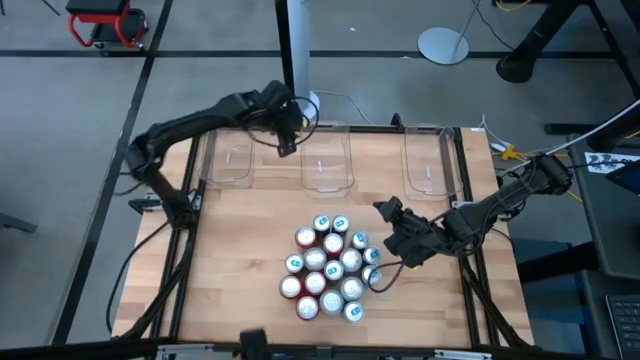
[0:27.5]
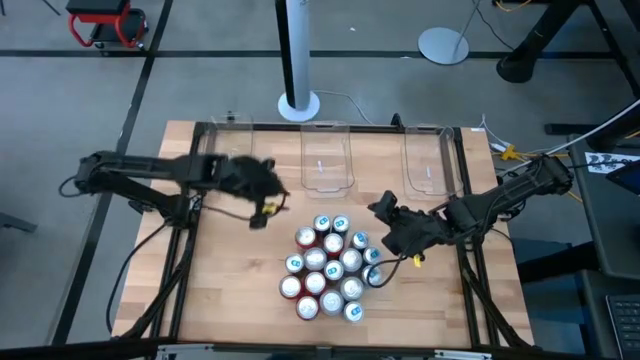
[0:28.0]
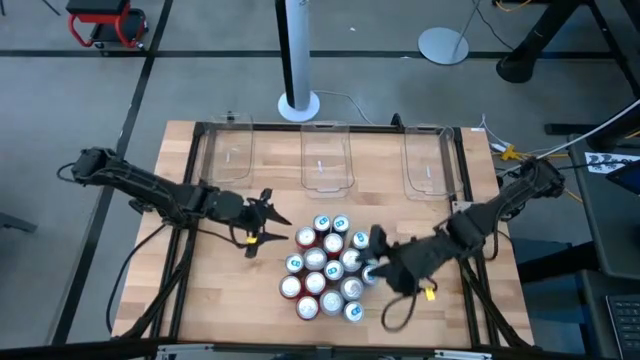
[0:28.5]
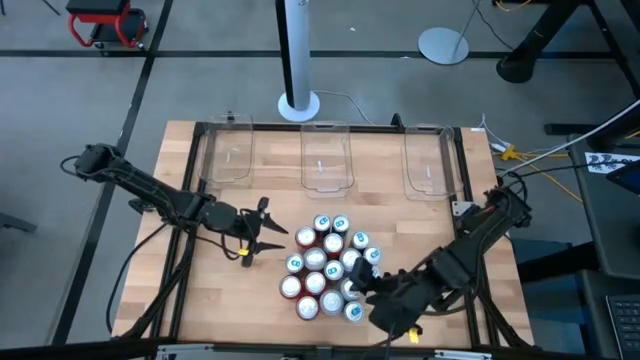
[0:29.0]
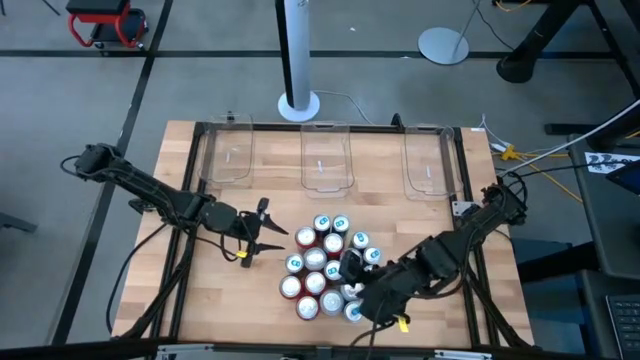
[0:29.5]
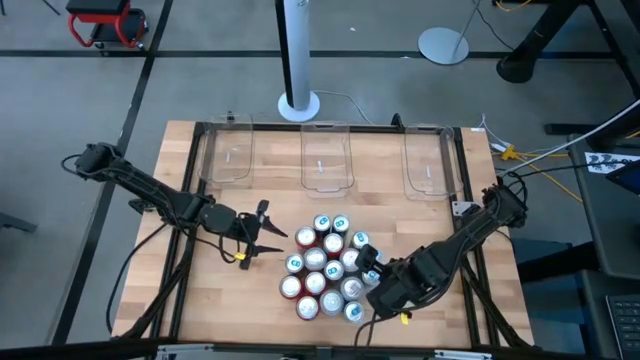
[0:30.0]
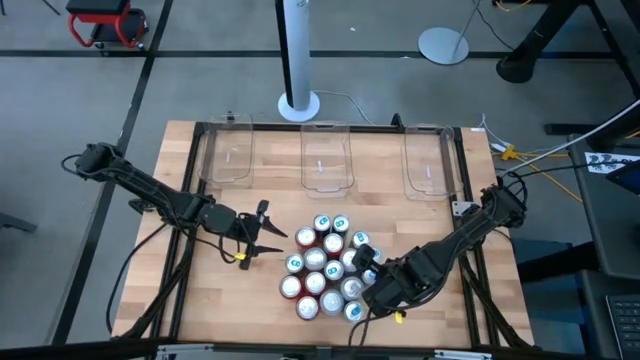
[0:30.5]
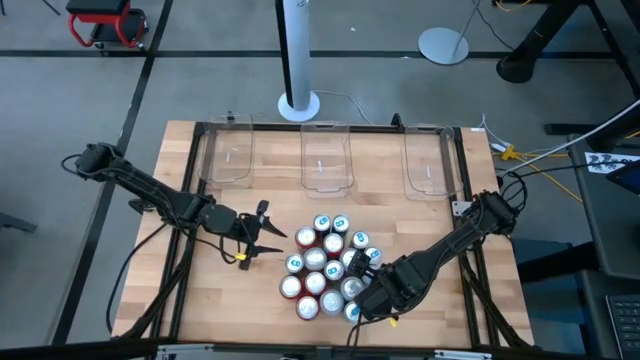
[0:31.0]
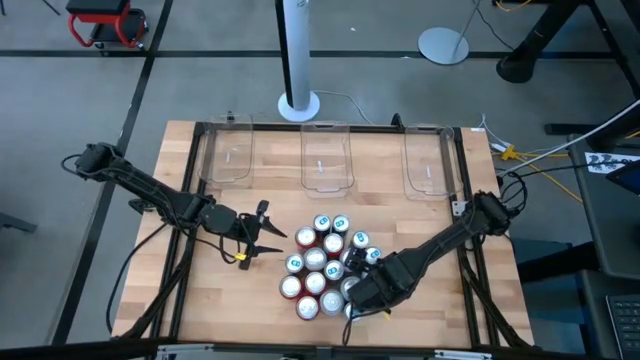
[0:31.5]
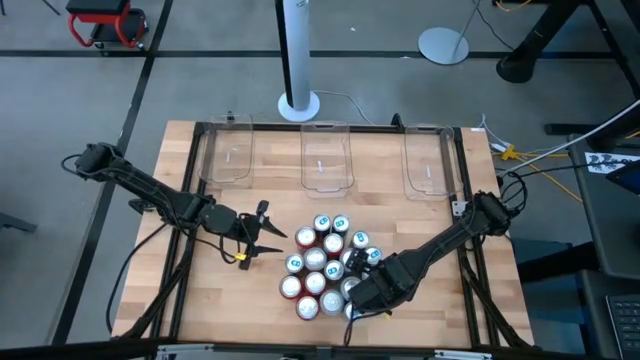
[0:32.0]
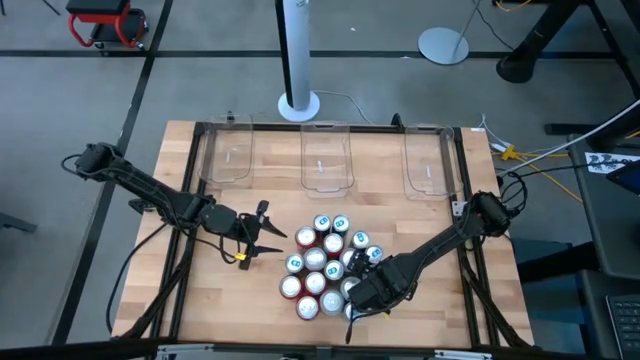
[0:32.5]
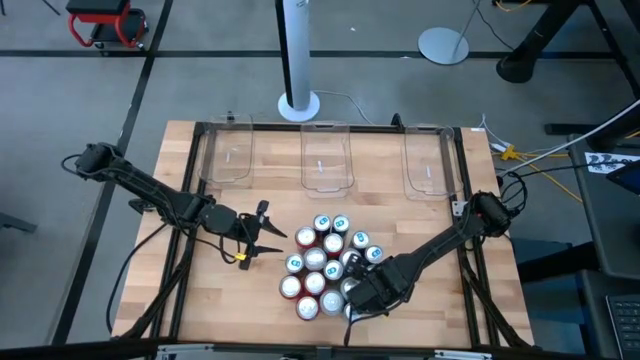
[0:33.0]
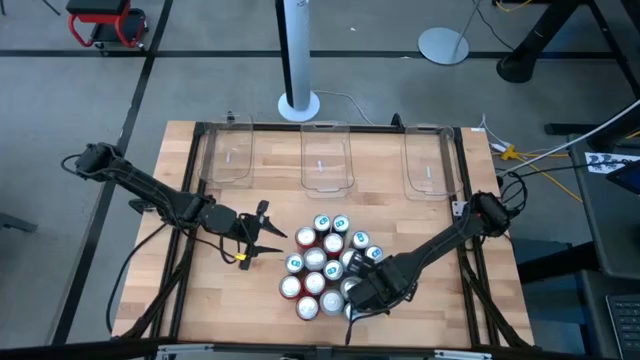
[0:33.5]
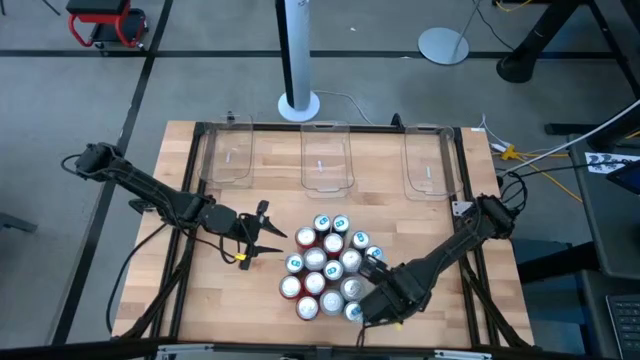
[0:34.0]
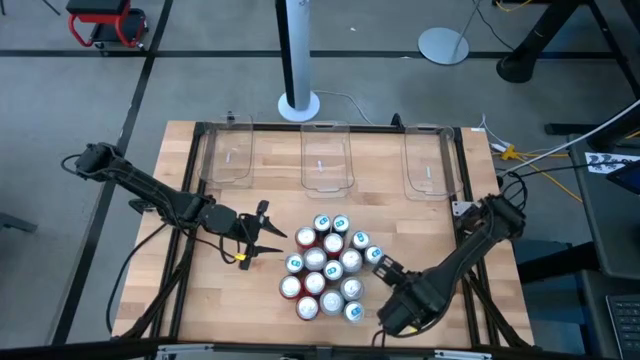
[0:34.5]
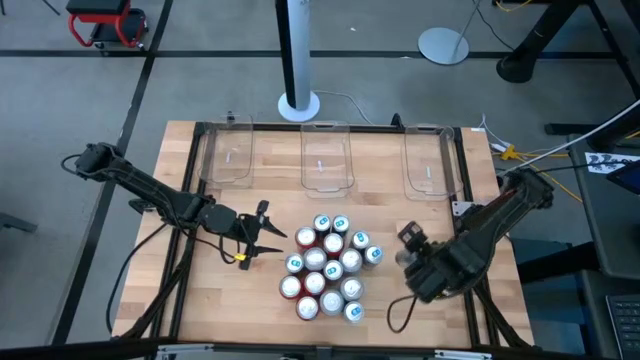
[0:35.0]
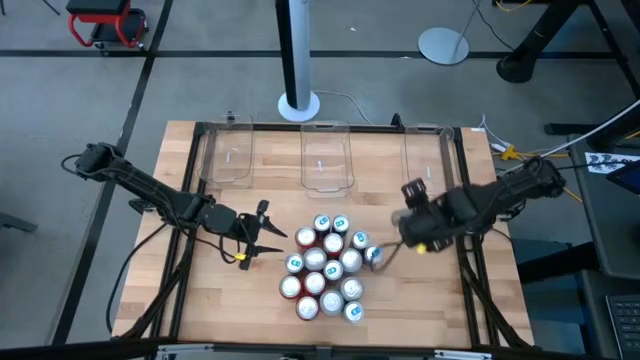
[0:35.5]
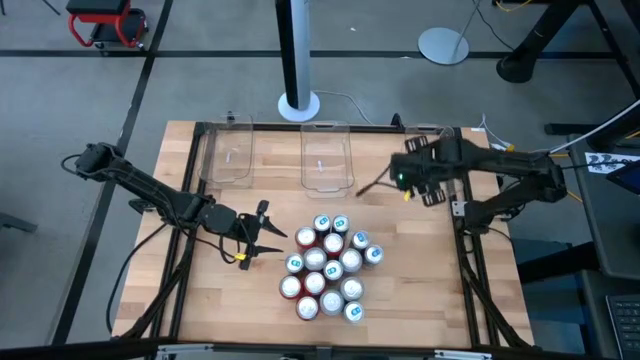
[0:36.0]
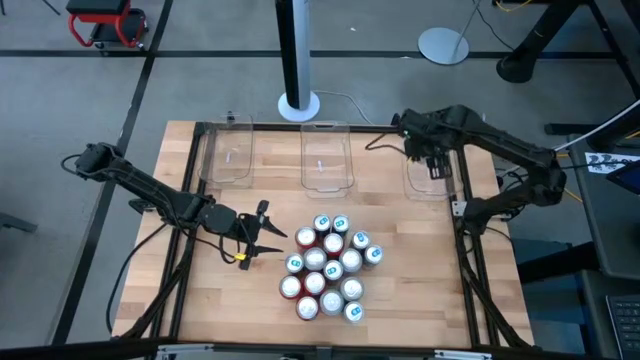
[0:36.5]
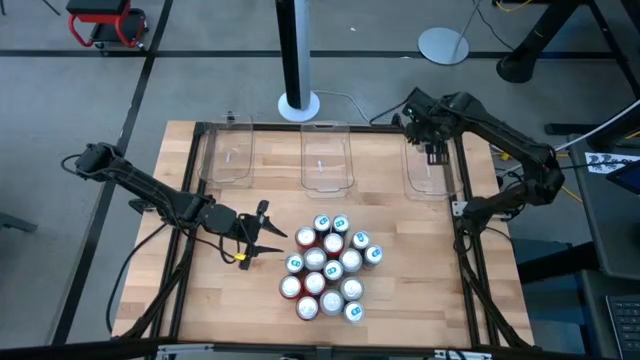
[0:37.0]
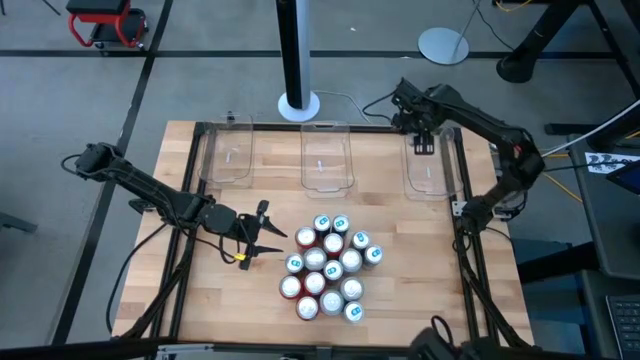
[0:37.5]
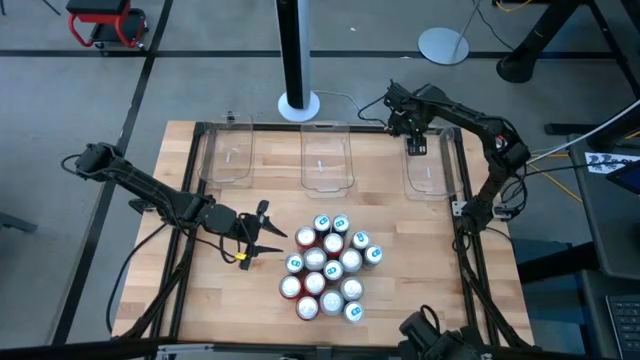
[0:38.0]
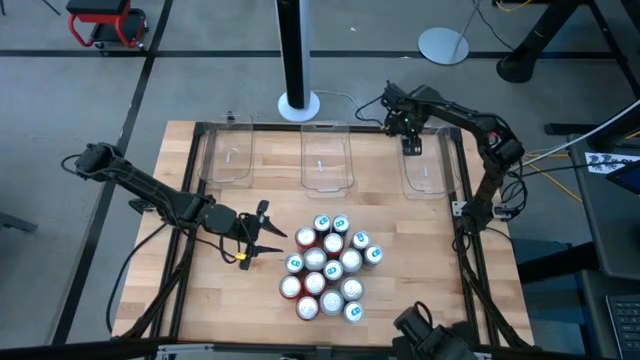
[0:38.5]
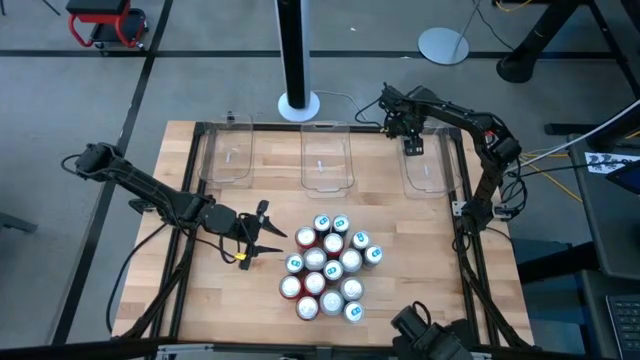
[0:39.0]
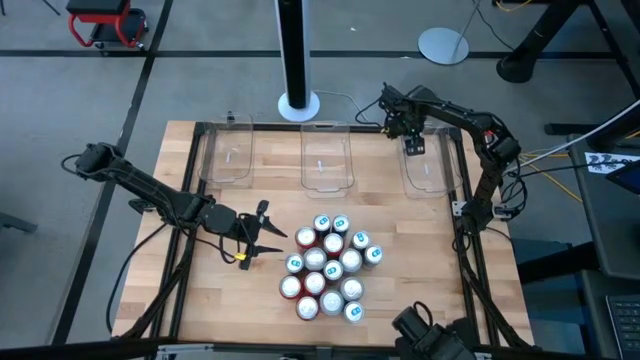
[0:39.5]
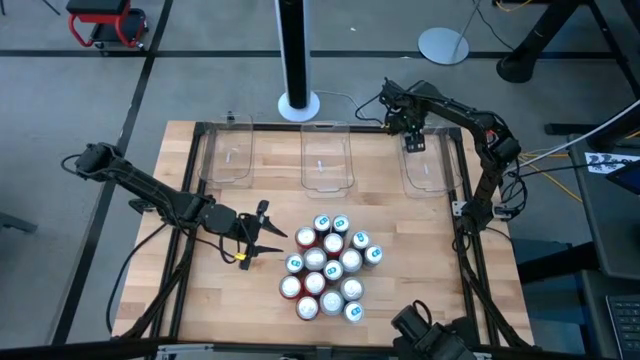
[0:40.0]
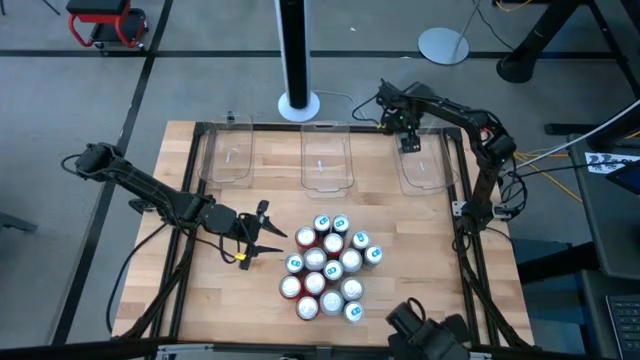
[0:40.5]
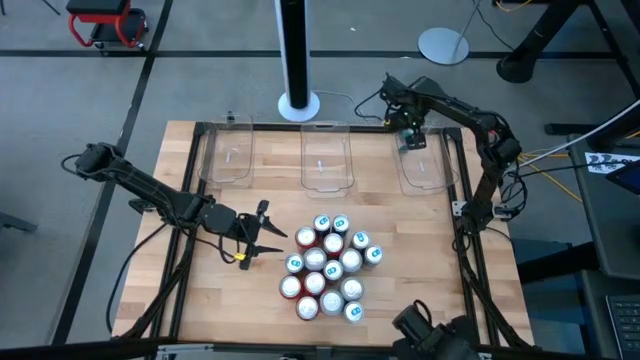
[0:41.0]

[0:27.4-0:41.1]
Task: Sort soda cans
Put the blue soda can into the top right transparent bin

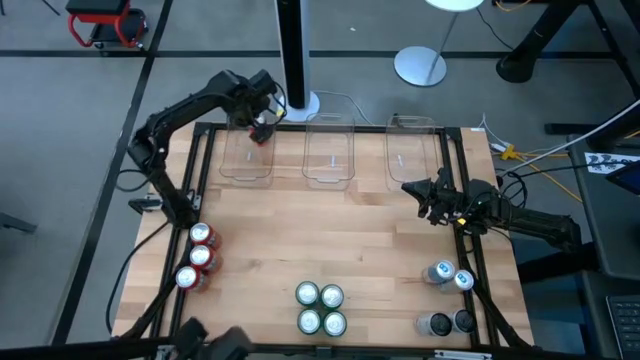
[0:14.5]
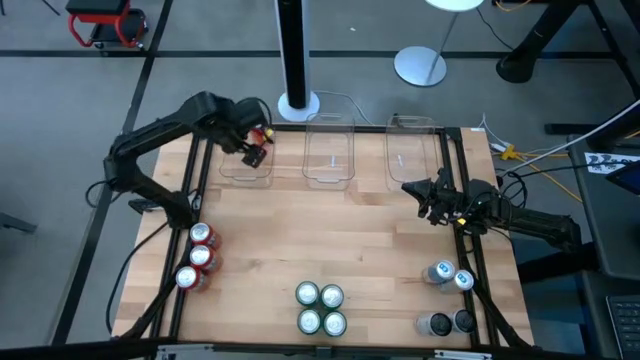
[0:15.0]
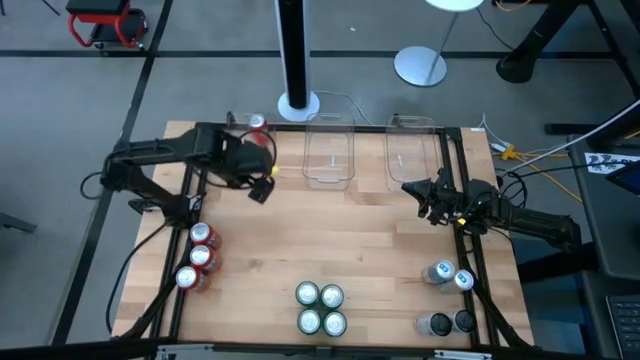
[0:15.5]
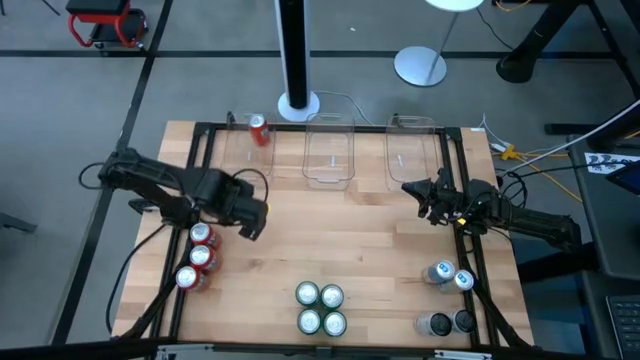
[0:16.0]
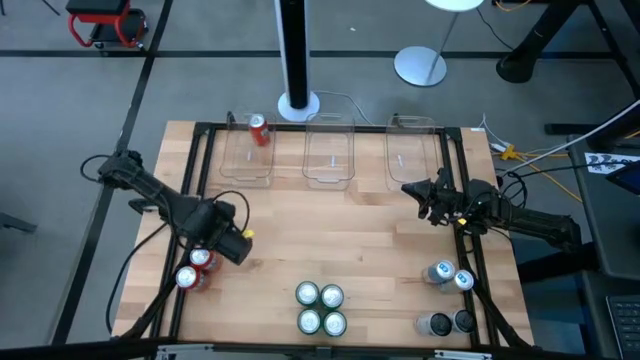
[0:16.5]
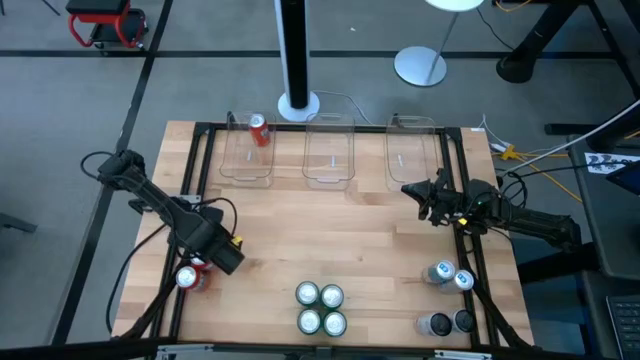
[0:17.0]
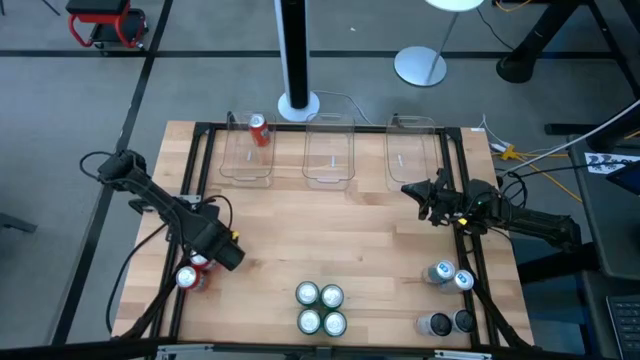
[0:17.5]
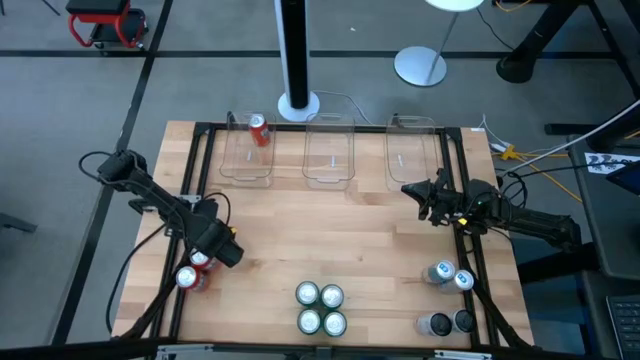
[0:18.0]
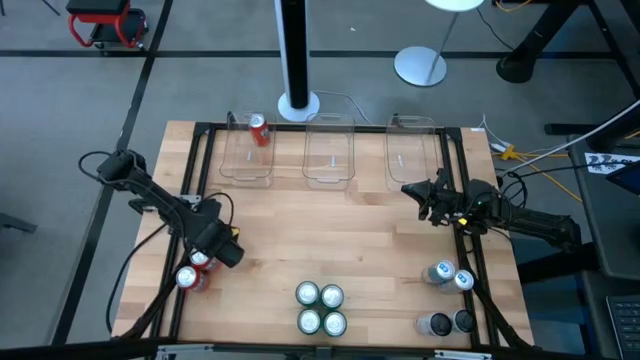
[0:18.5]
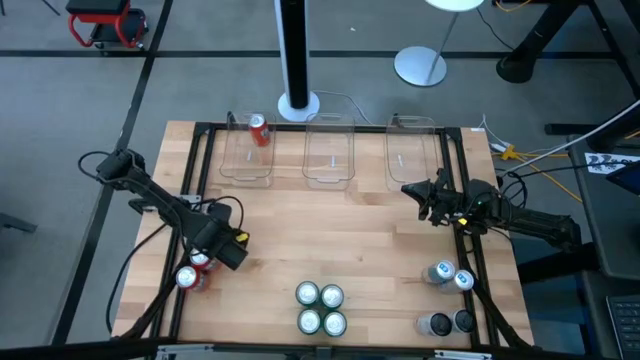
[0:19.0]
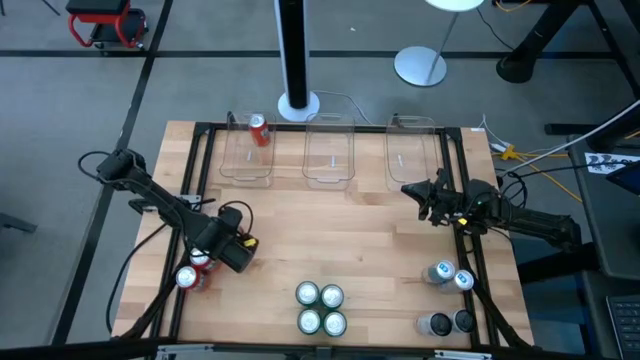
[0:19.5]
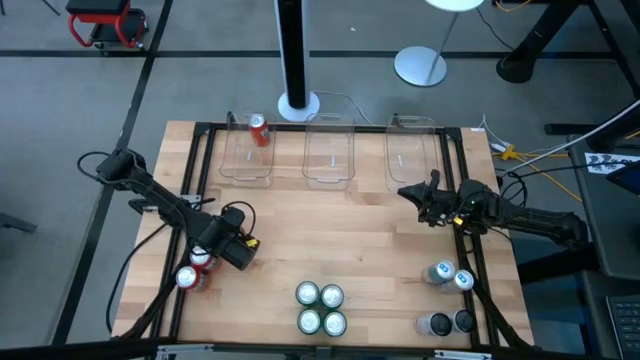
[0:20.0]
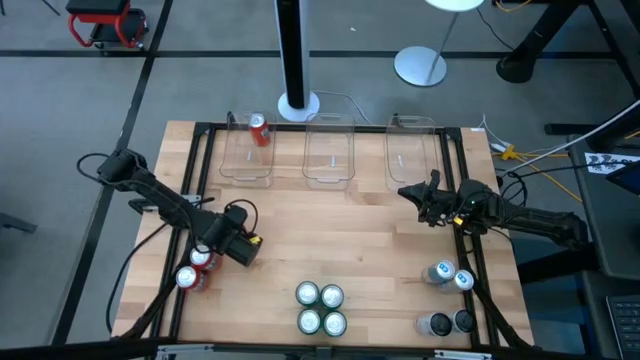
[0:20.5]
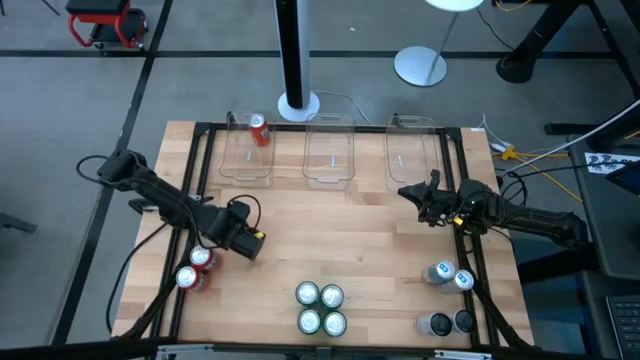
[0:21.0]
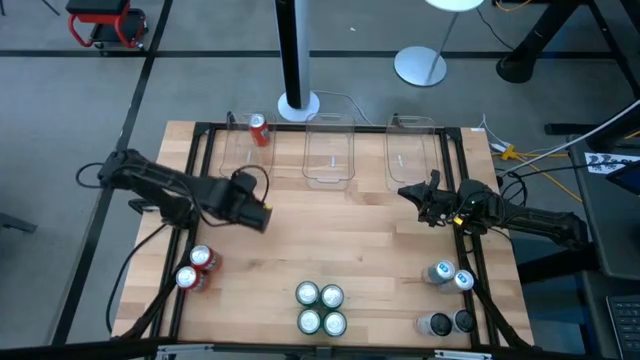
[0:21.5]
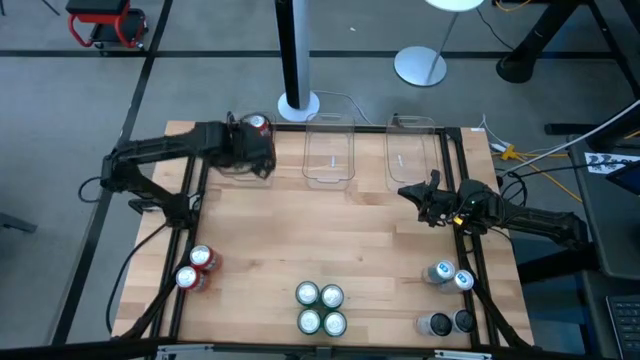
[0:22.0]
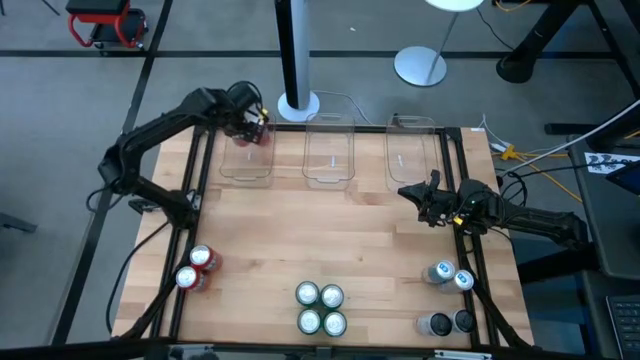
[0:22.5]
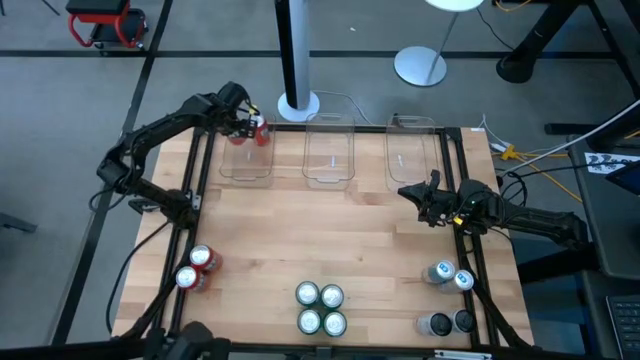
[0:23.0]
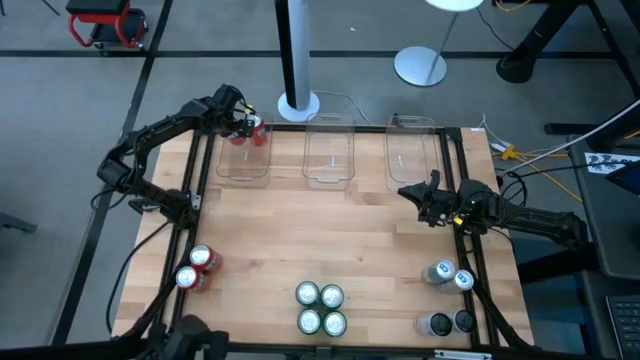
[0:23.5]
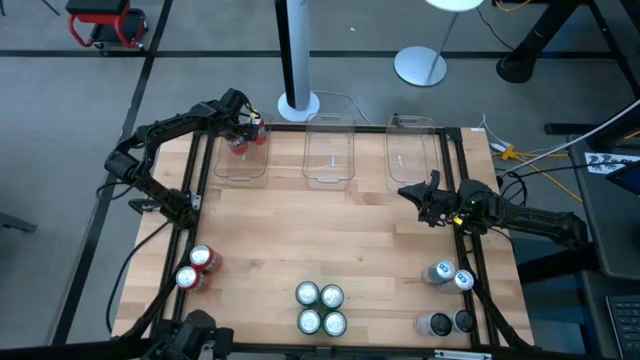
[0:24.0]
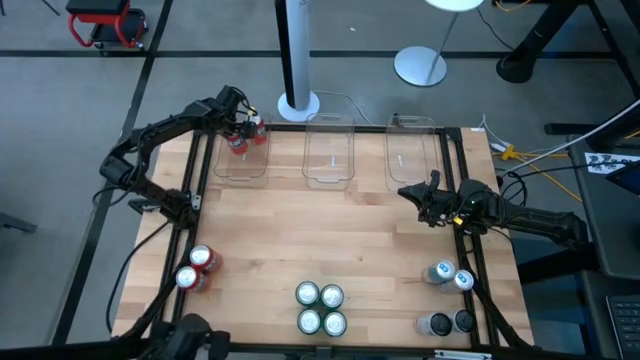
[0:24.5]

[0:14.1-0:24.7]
Task: Sort soda cans
Put the top orange soda can into the left transparent bin
